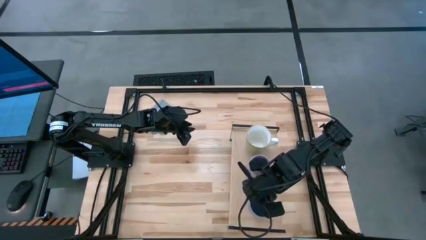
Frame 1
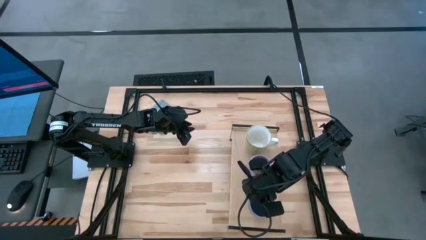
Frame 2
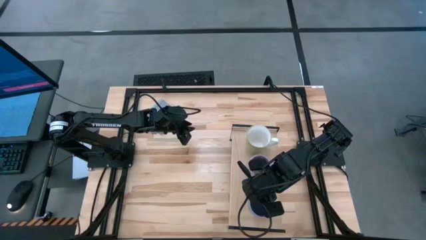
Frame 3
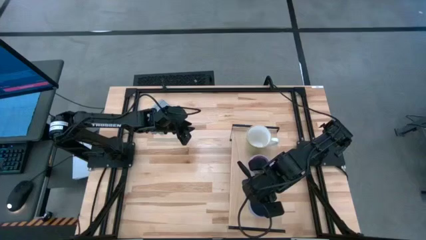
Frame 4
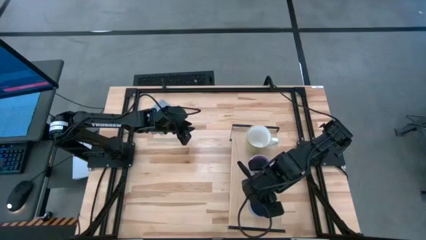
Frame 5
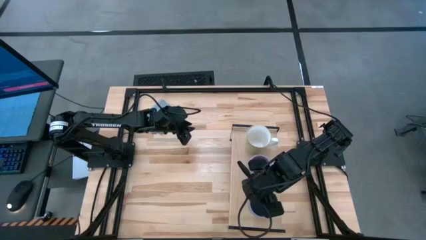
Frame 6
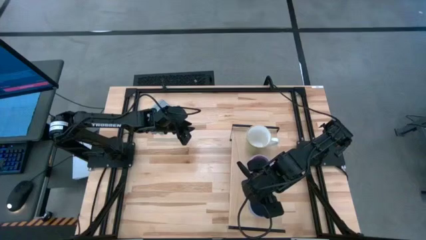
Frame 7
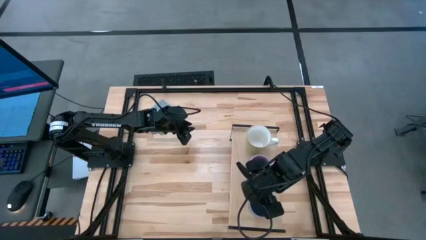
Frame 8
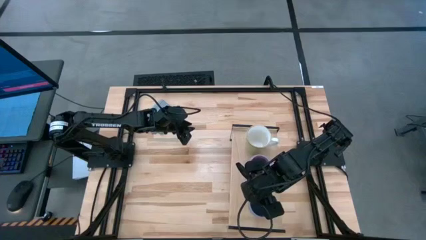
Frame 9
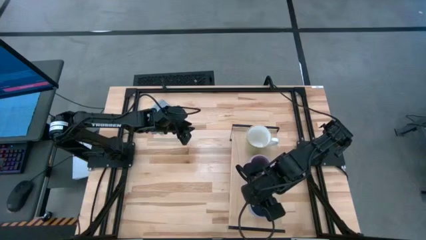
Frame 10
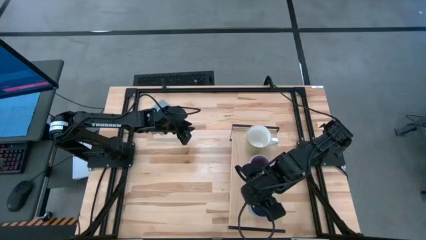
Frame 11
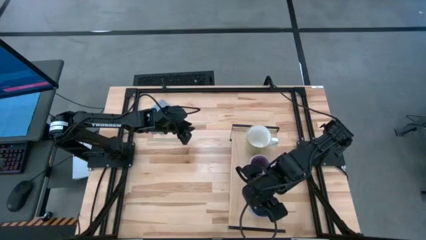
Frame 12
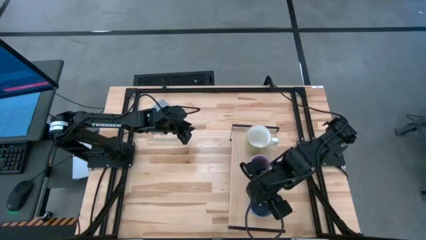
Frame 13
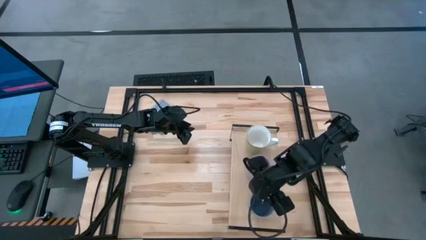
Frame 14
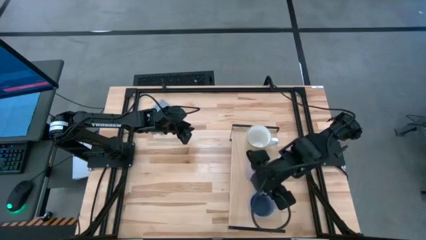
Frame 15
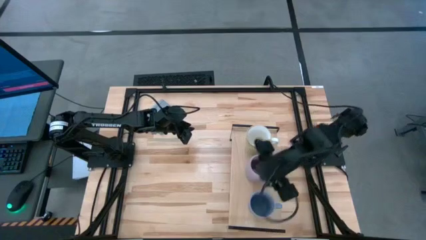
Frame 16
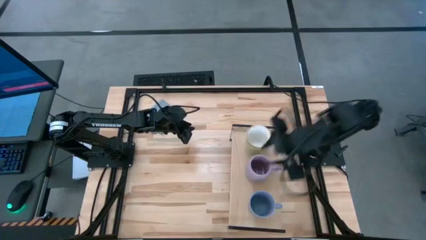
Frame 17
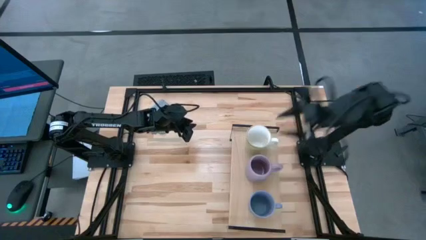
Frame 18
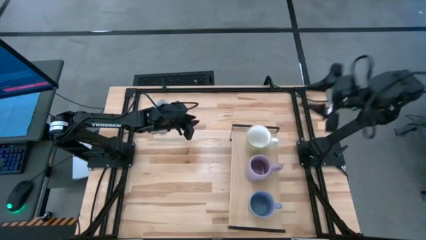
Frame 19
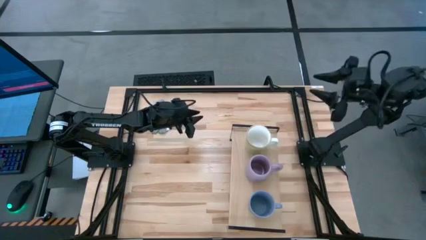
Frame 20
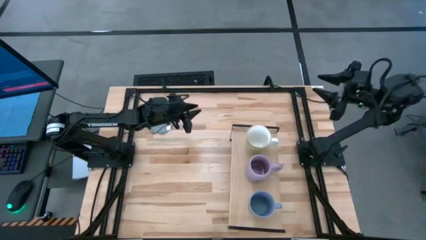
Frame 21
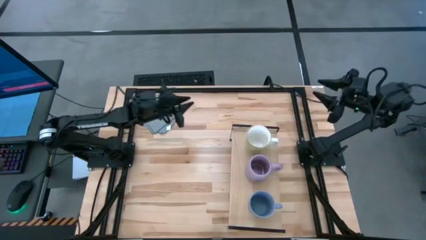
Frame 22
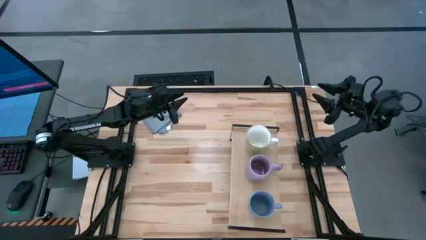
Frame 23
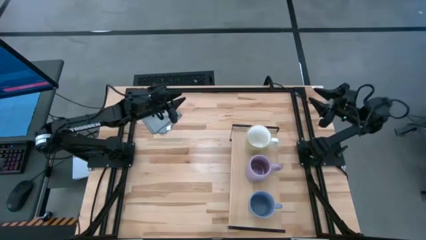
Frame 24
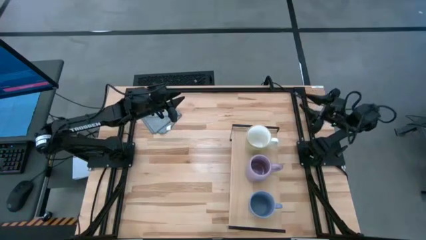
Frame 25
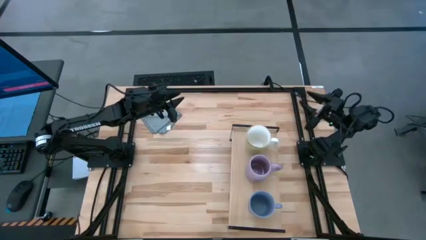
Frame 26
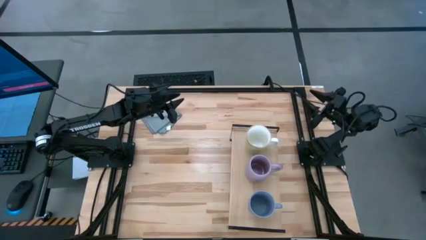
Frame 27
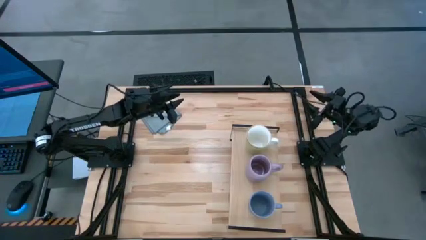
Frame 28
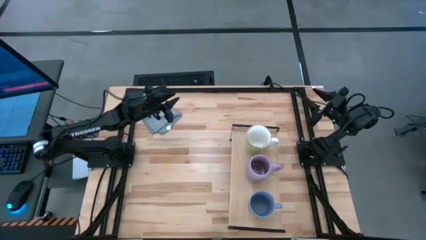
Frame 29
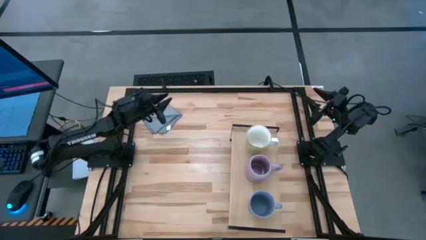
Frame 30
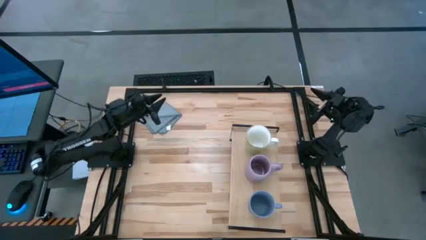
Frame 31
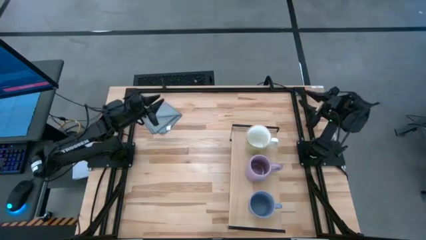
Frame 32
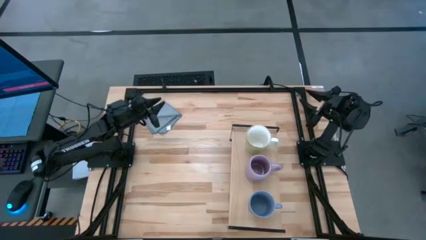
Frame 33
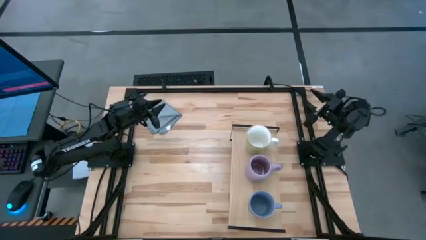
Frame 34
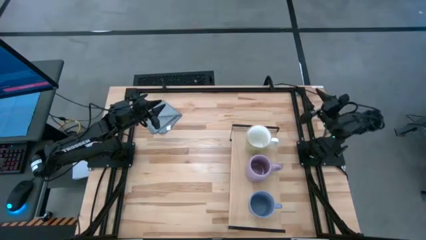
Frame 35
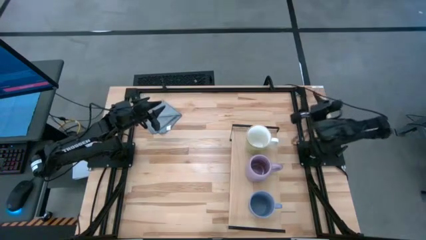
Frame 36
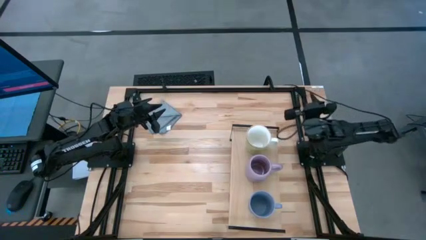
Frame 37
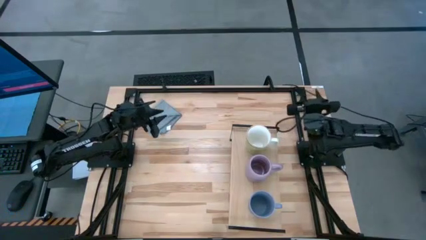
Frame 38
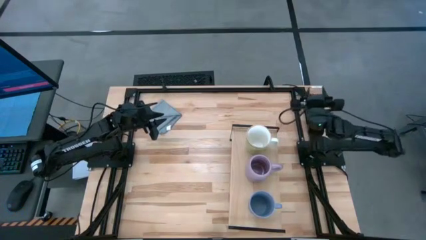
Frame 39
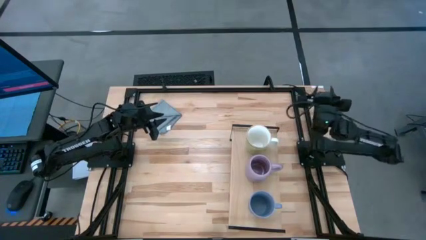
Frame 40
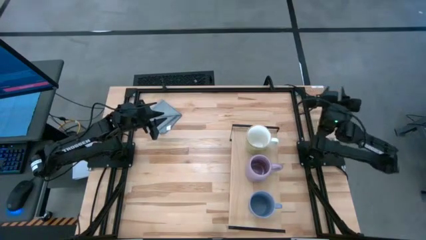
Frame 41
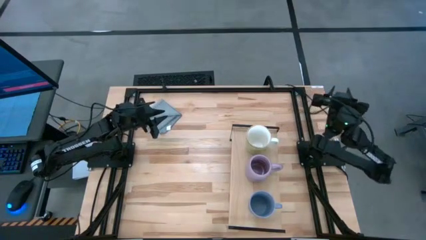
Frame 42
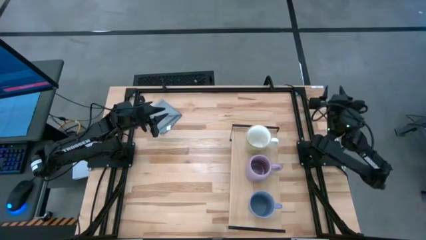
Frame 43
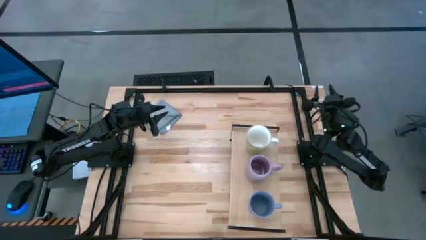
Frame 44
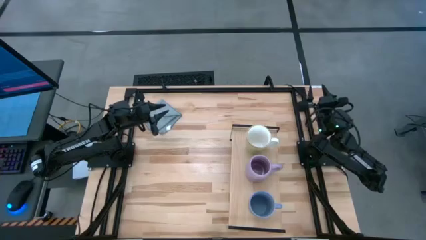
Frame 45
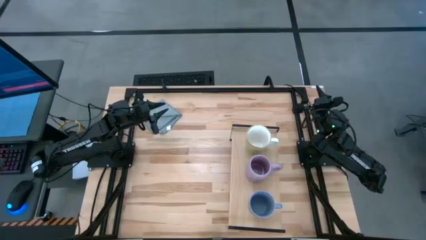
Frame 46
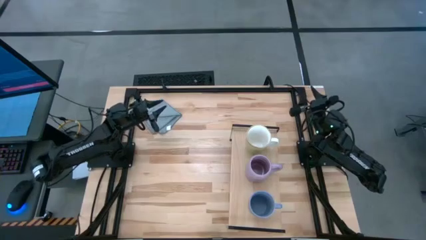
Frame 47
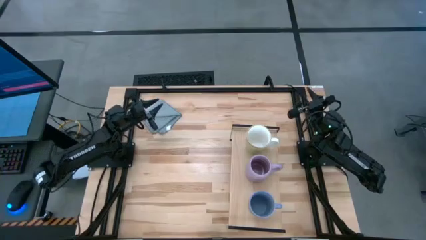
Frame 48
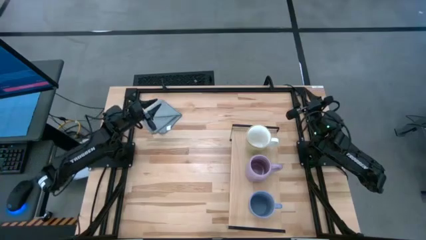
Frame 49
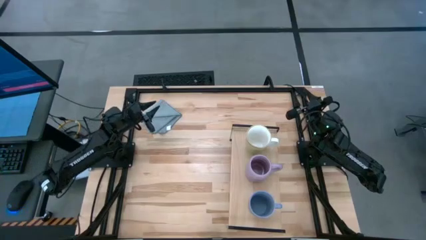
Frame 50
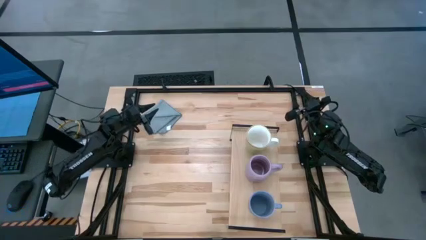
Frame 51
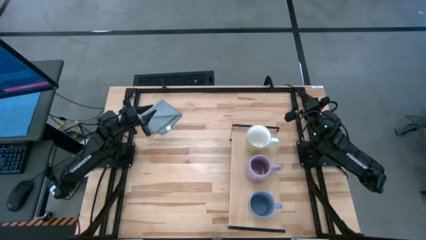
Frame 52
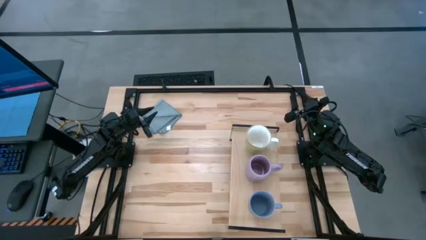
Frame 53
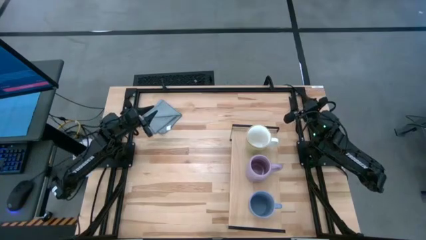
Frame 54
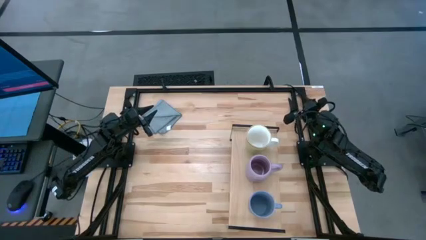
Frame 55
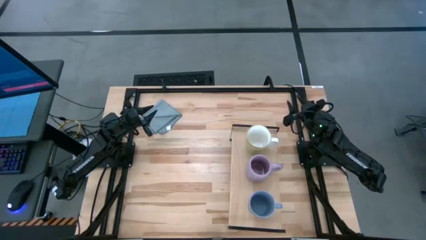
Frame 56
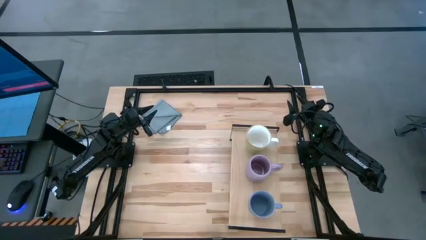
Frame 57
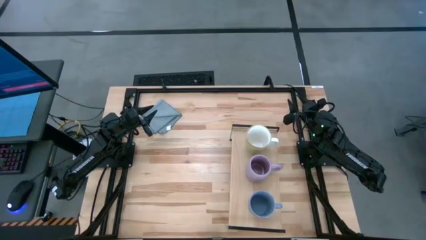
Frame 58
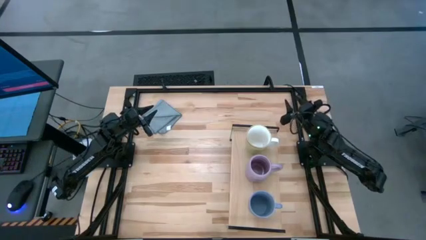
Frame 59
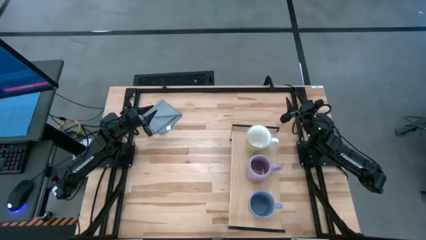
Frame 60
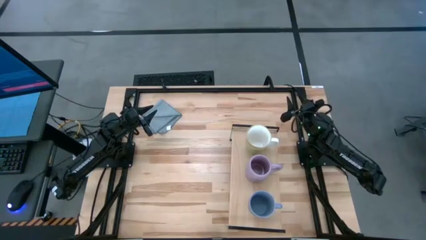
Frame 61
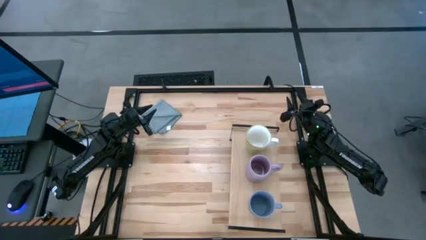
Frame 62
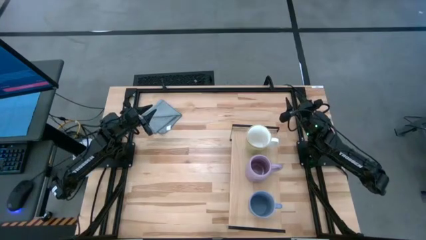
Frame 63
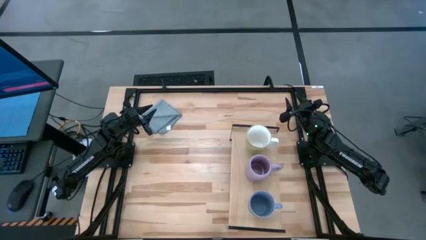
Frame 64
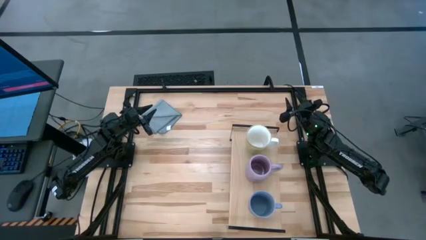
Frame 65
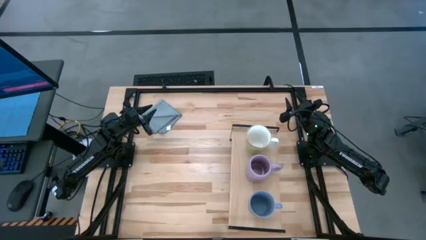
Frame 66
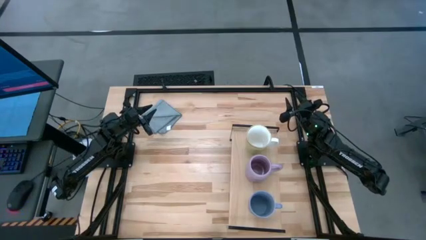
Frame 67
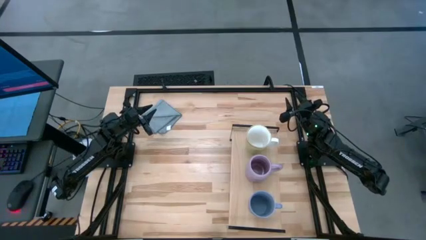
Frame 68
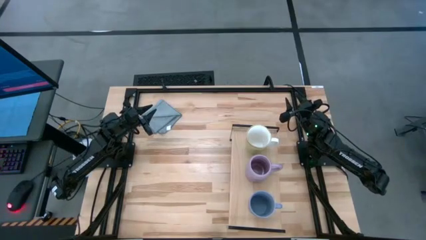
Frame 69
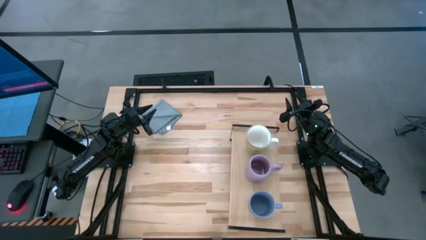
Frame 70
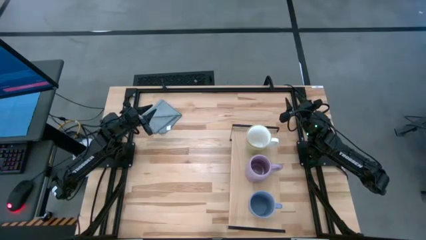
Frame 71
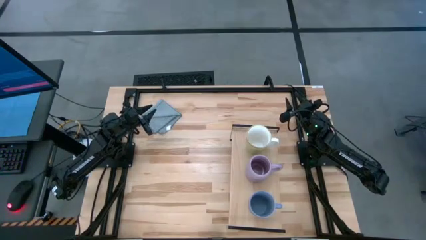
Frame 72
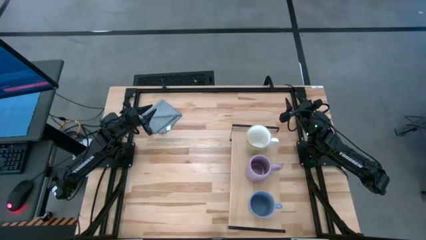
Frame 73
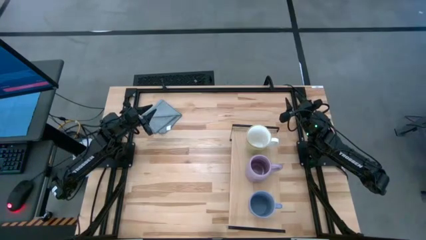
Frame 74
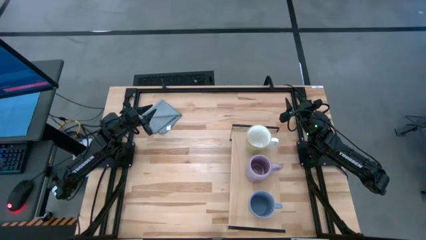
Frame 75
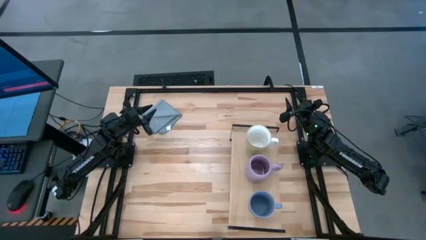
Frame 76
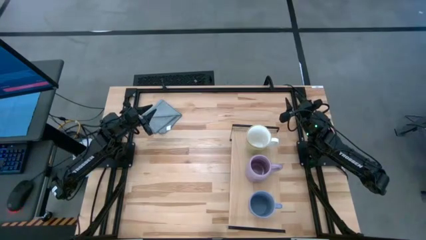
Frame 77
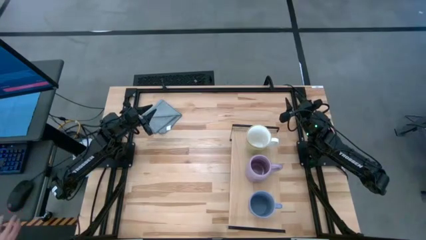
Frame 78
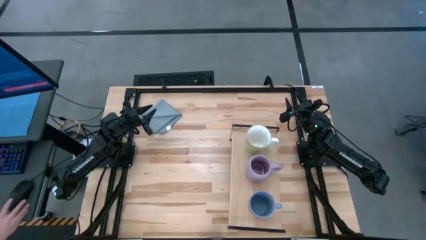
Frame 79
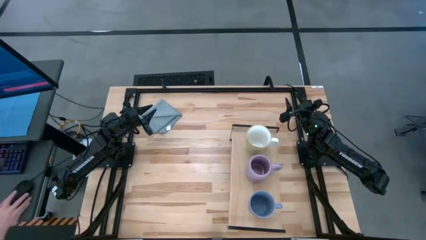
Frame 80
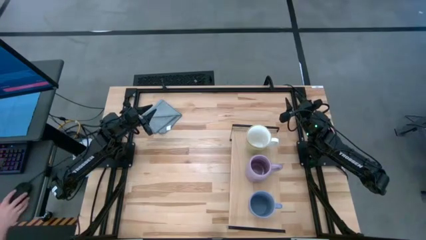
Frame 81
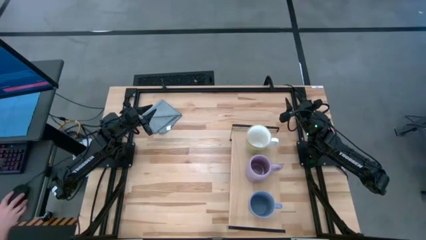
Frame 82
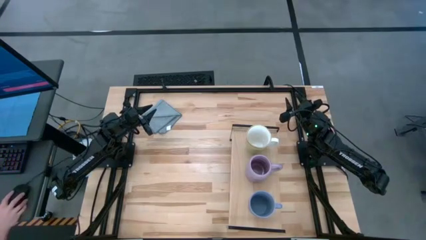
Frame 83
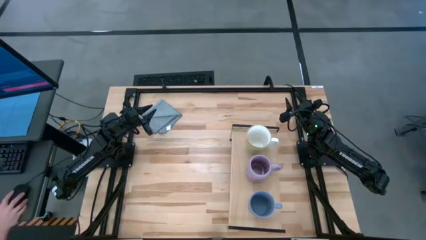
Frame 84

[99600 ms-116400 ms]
Task: Stack small to large cups/mugs on shelf
Return to Home Position
